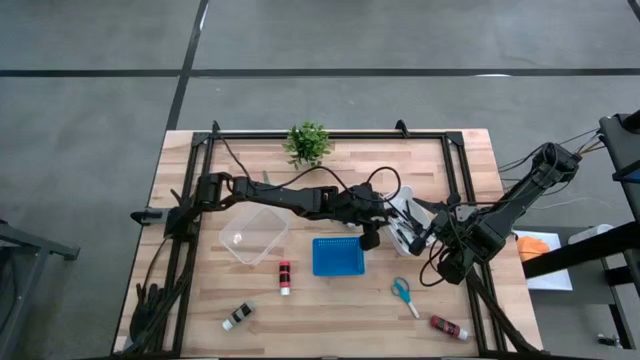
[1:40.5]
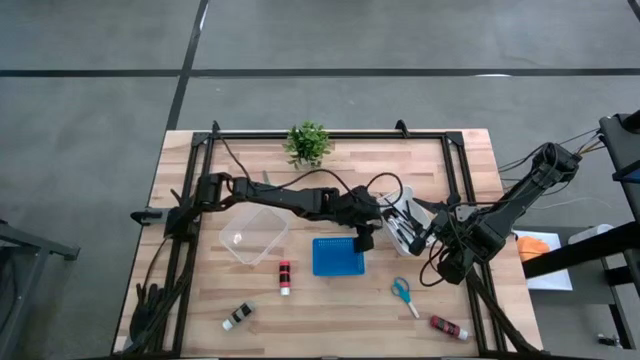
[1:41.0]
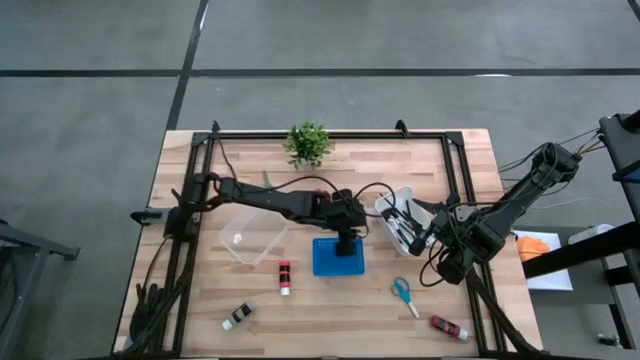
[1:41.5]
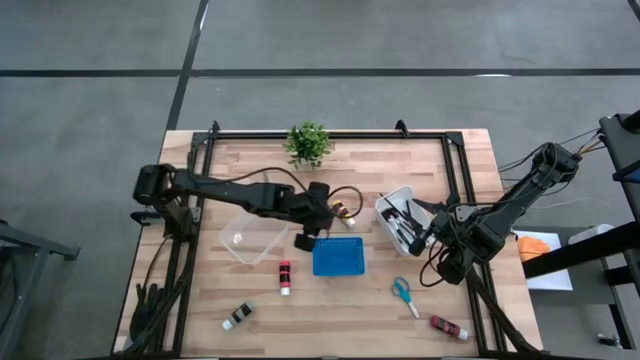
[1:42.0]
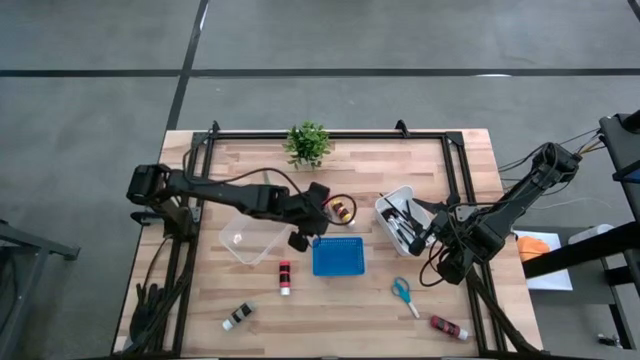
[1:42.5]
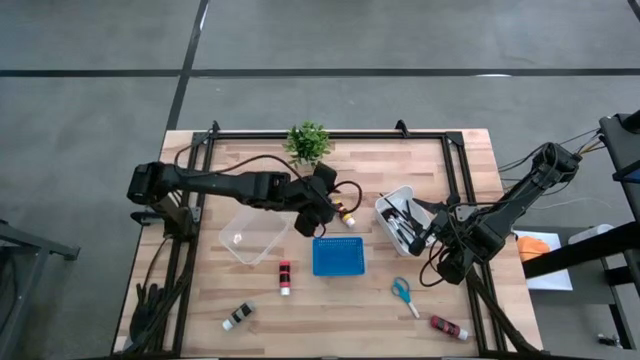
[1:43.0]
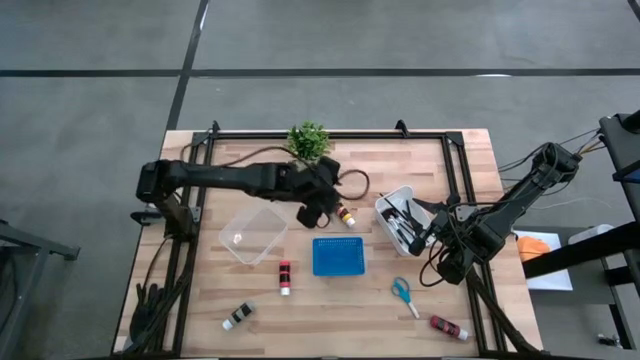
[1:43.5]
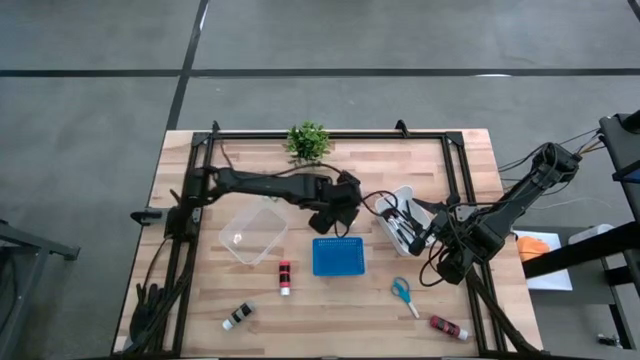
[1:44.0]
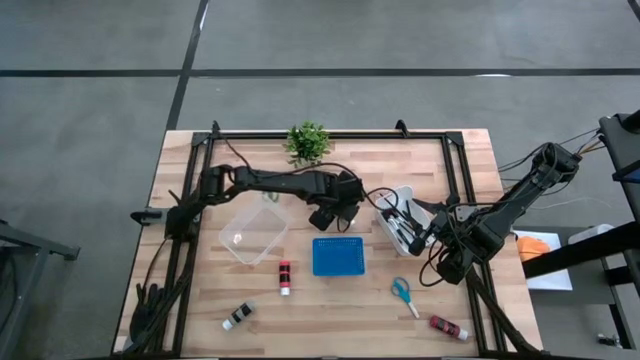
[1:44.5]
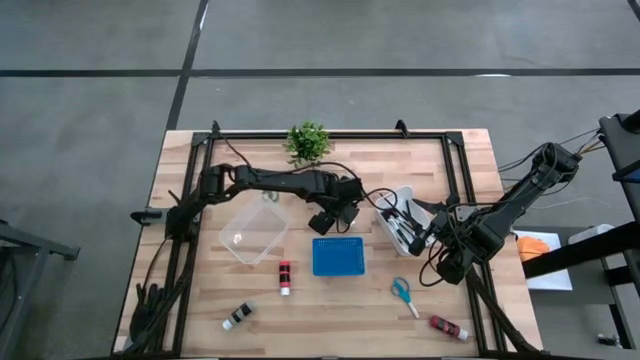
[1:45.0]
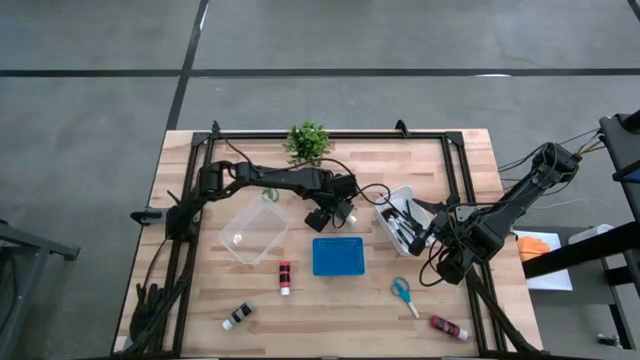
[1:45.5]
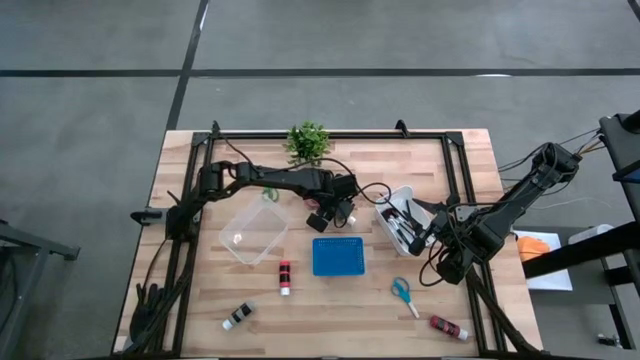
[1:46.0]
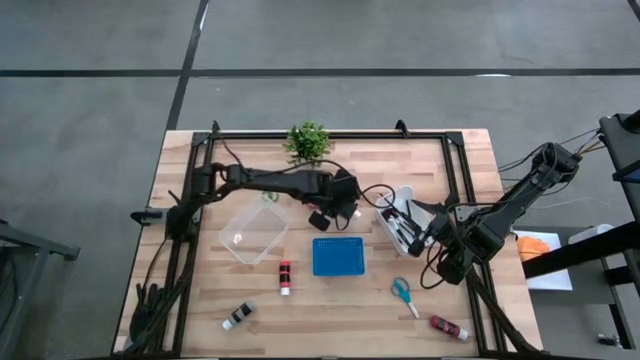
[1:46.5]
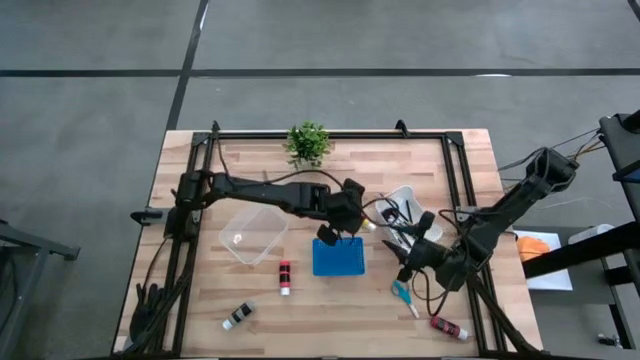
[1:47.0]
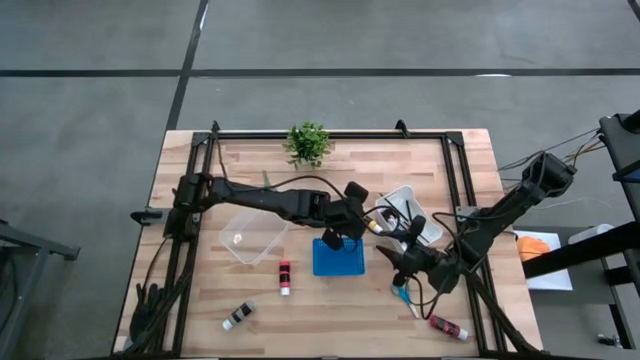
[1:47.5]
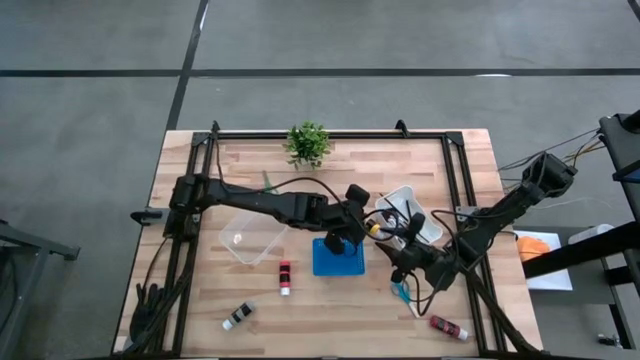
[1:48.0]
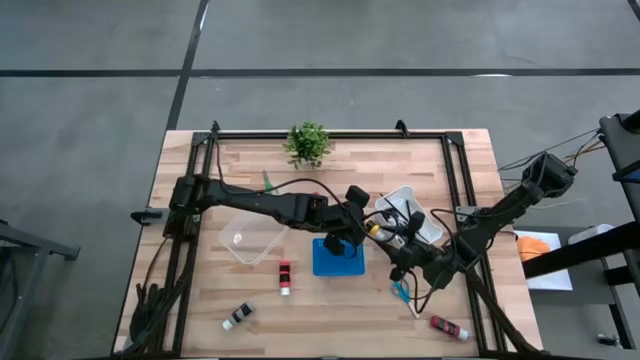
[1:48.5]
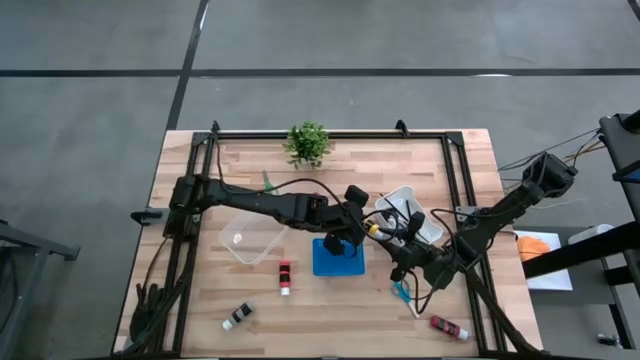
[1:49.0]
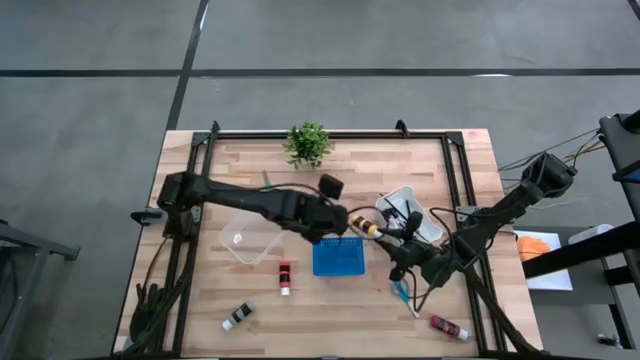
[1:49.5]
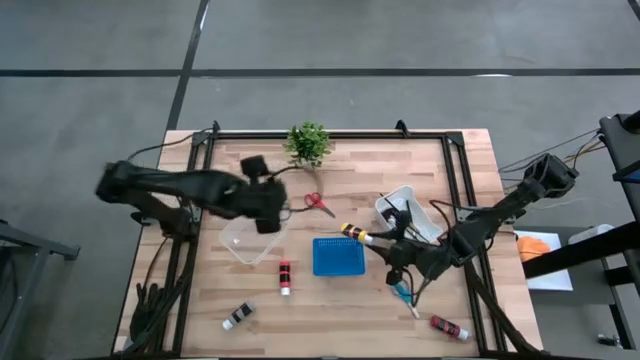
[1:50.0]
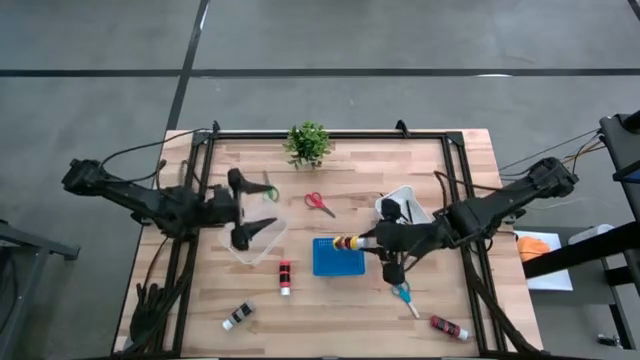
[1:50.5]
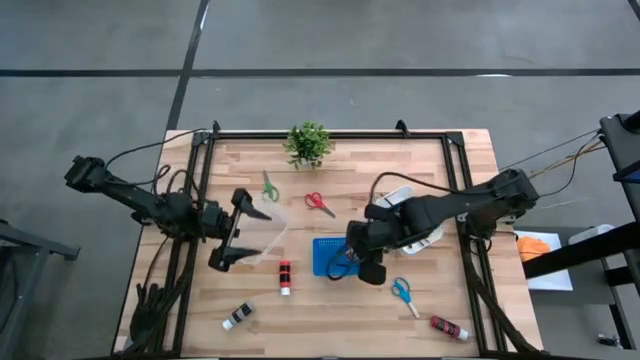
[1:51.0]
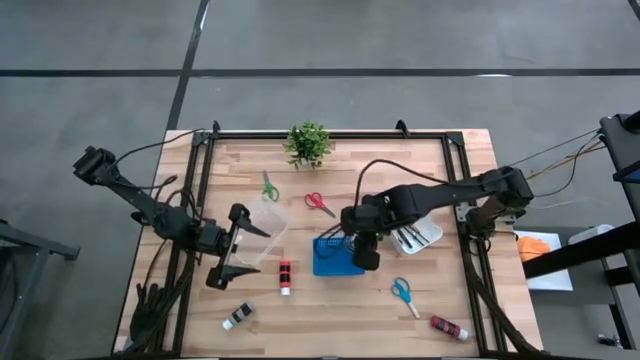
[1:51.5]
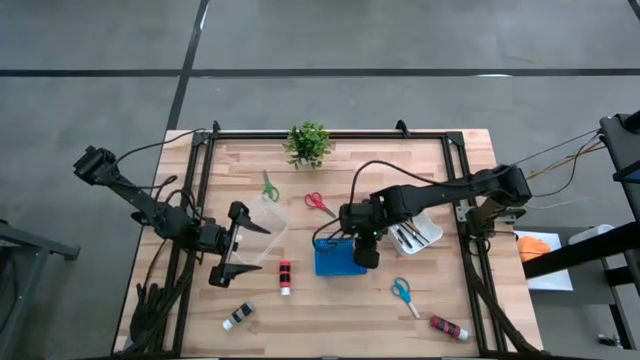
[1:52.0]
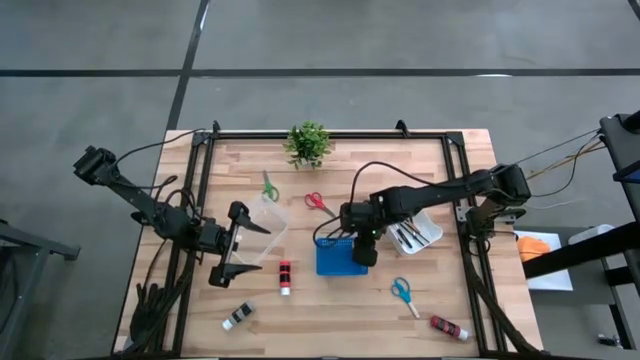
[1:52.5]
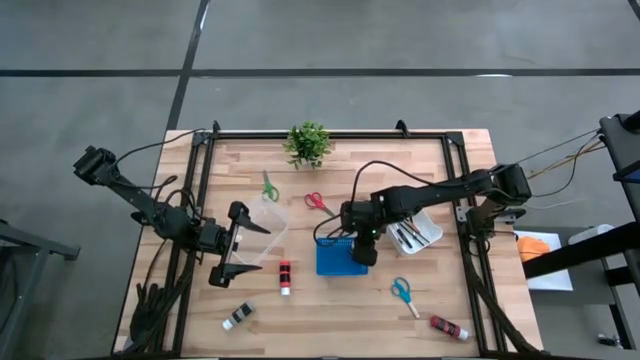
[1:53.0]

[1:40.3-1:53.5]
Task: Pick & Place Paint Supplies
Put the yellow paint bottle in the blue bin

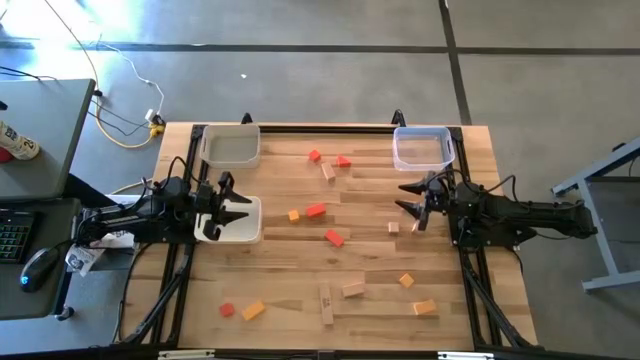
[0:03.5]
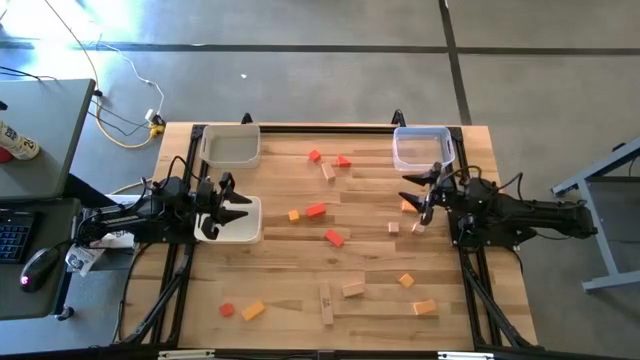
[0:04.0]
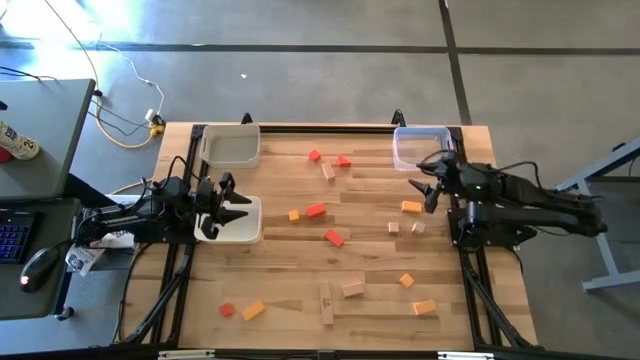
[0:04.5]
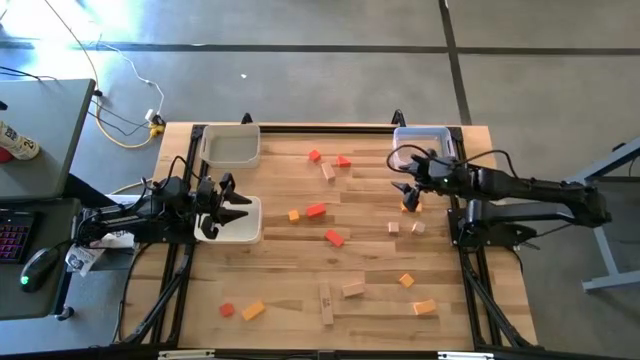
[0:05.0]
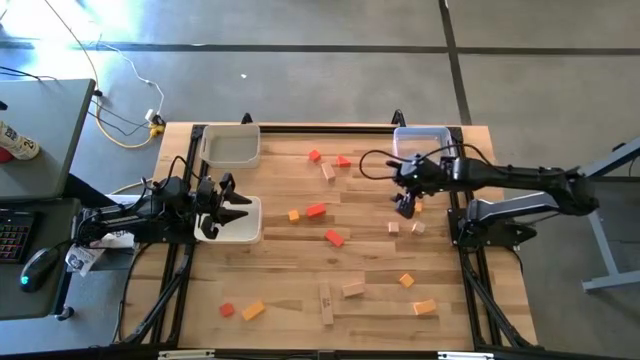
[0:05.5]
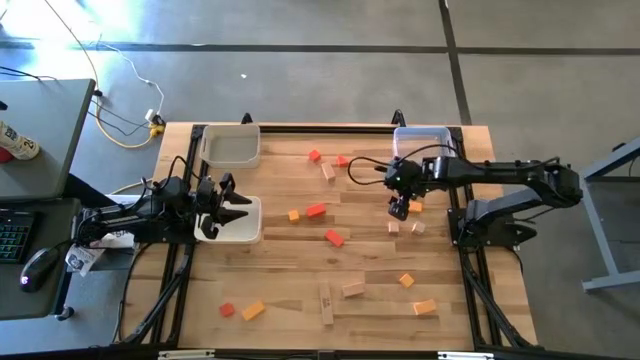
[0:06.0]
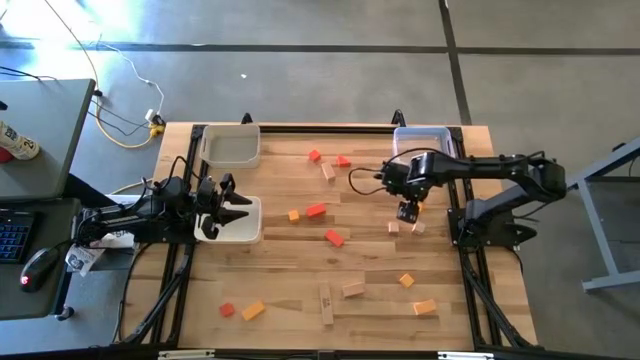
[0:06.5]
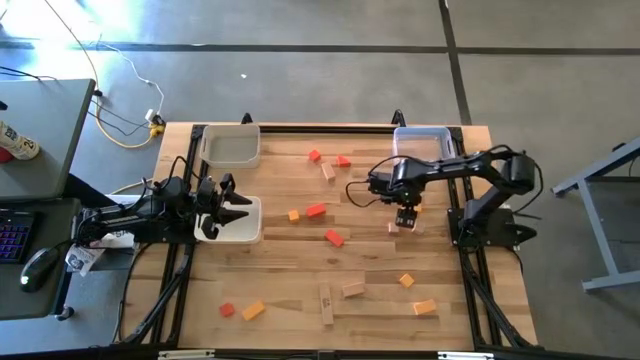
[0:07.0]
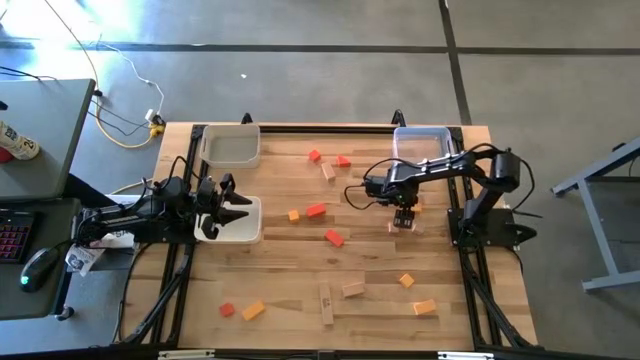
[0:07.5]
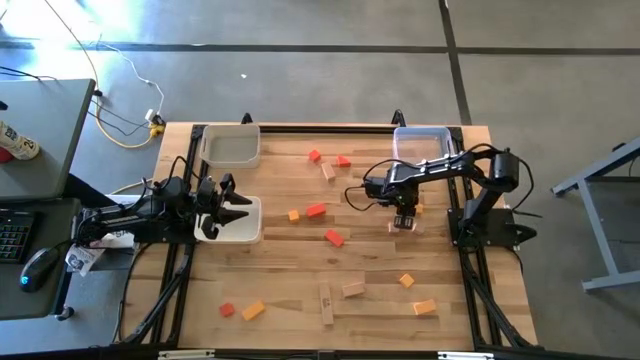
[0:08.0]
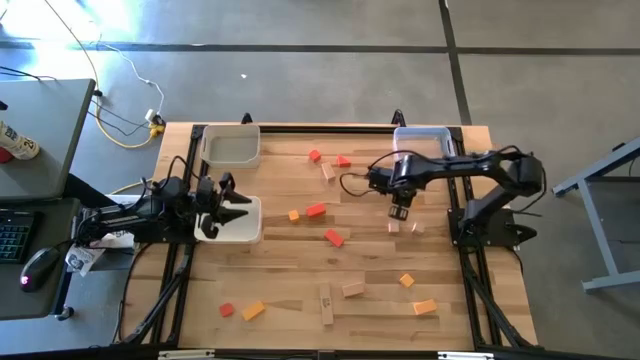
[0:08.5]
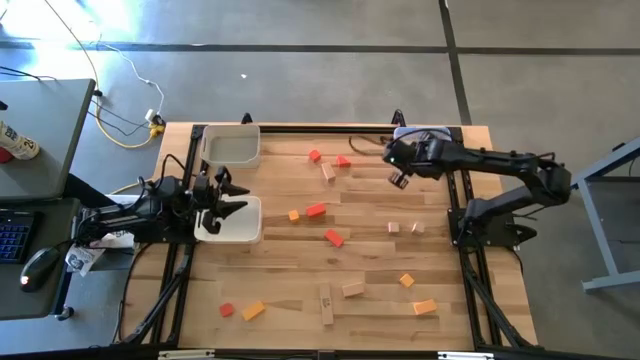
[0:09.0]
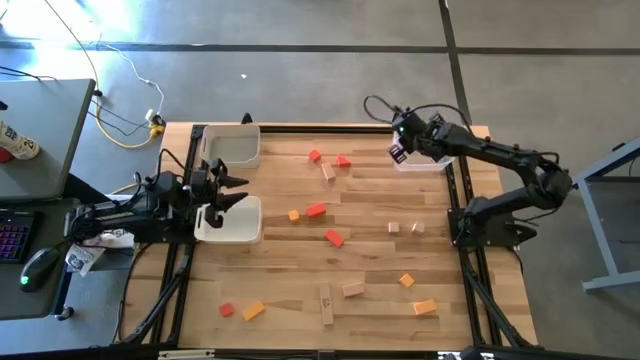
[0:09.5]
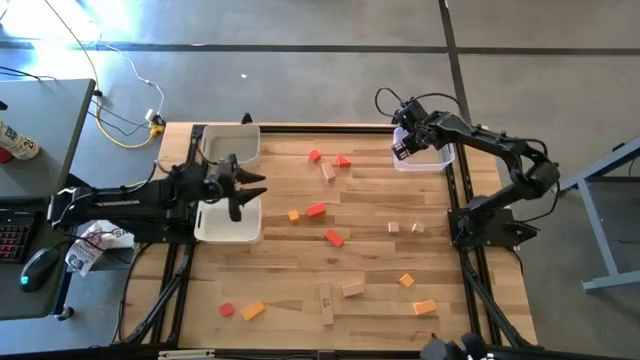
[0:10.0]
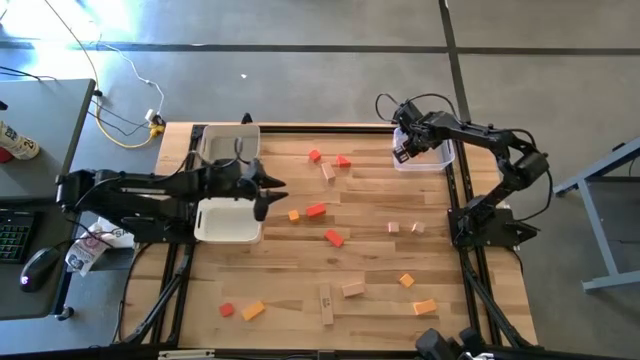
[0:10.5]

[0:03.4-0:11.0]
Task: Sort & place blocks by color
Put the yellow block into the transparent bin
